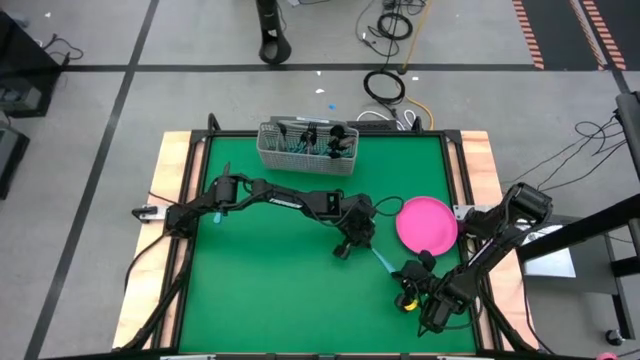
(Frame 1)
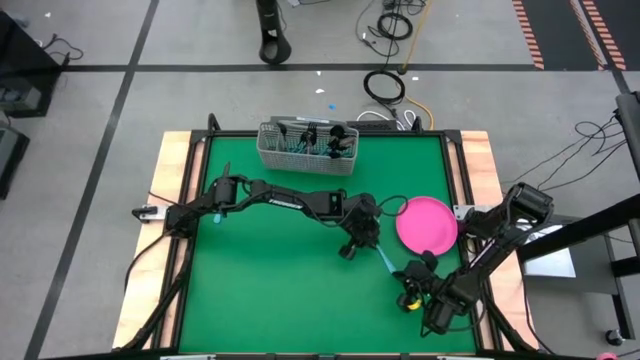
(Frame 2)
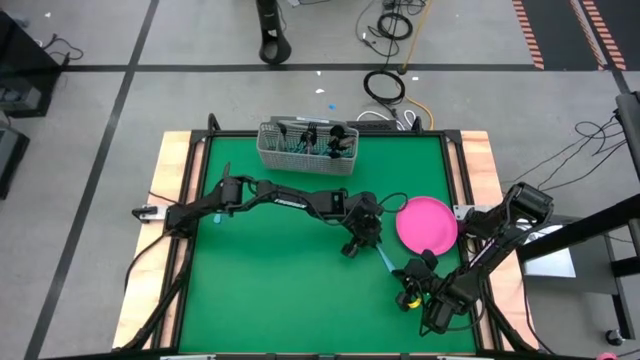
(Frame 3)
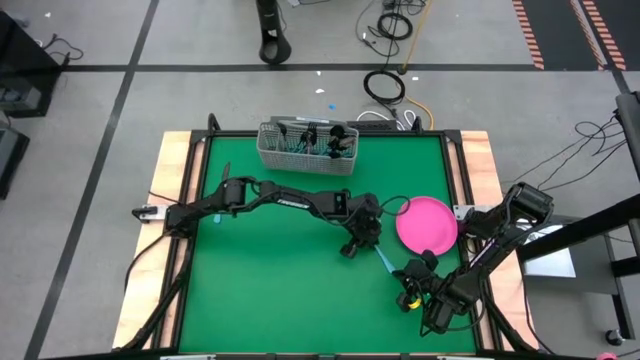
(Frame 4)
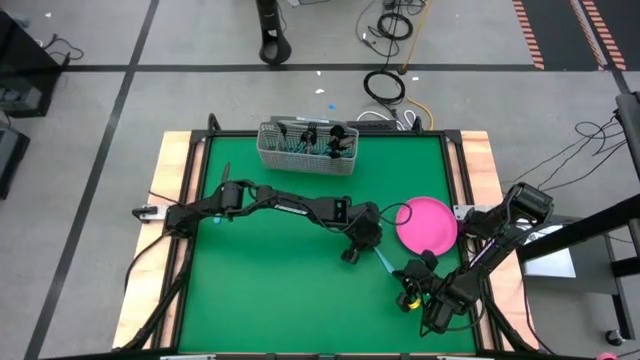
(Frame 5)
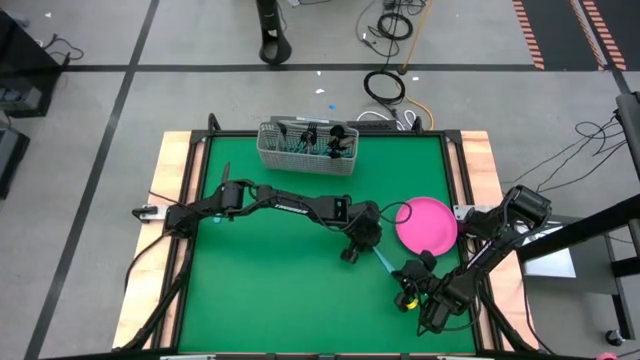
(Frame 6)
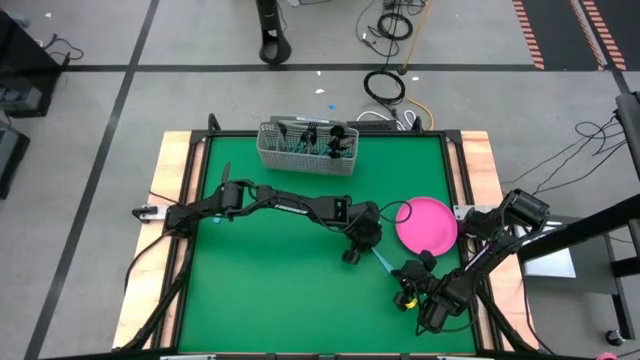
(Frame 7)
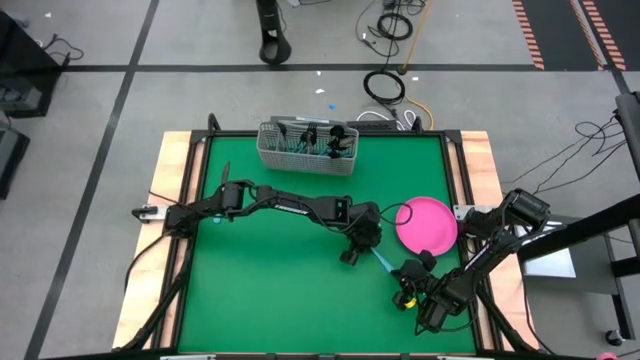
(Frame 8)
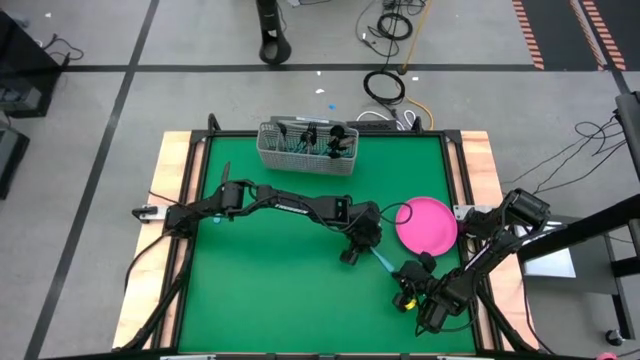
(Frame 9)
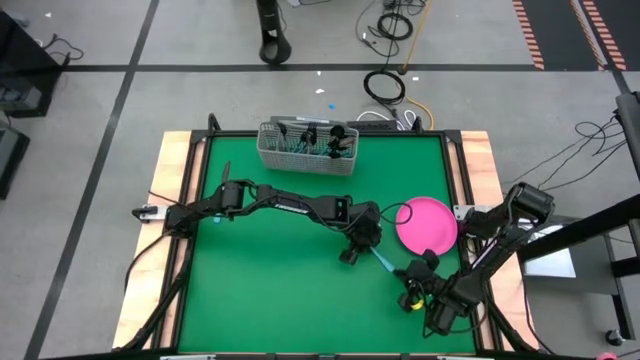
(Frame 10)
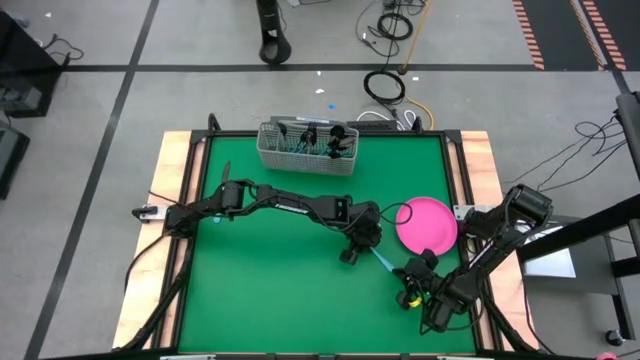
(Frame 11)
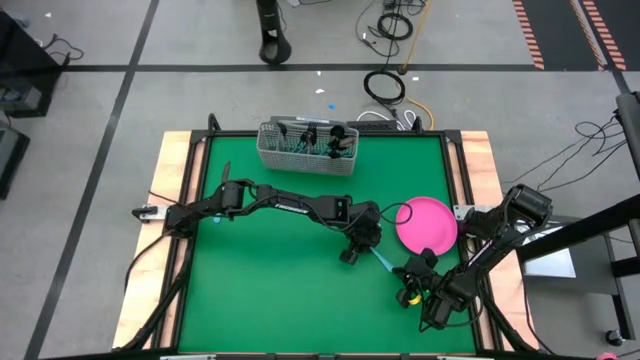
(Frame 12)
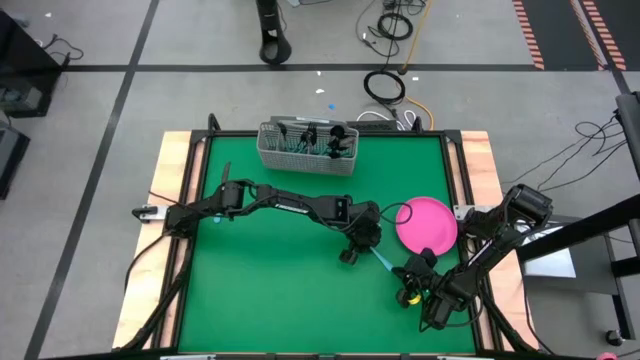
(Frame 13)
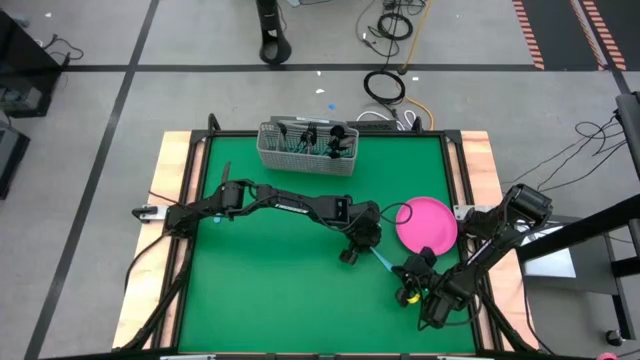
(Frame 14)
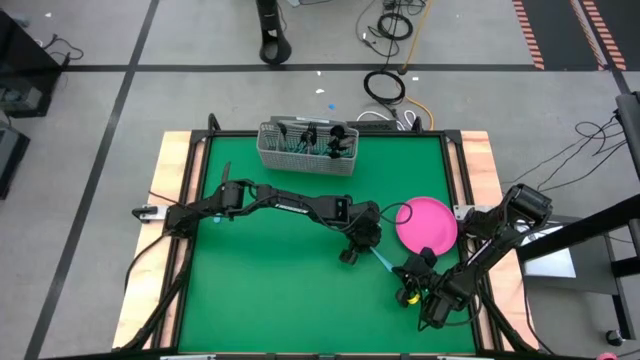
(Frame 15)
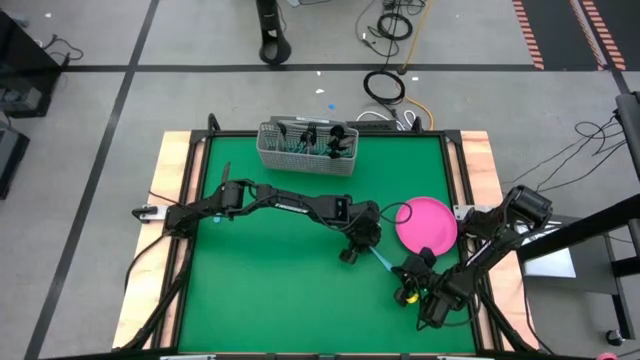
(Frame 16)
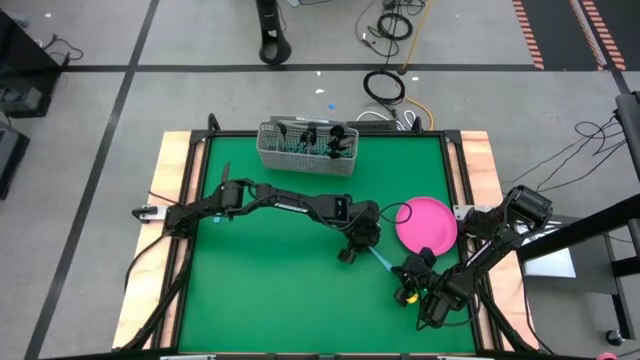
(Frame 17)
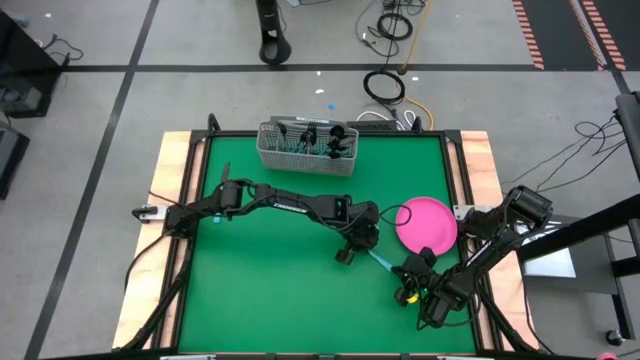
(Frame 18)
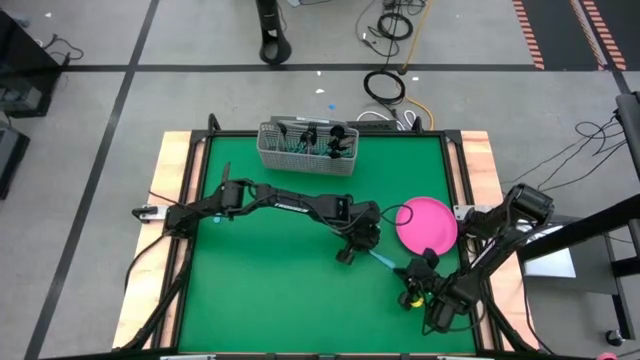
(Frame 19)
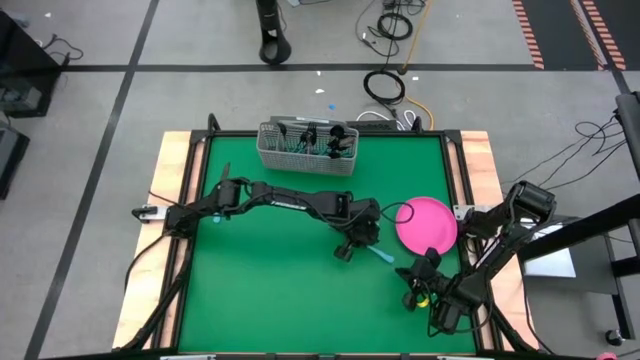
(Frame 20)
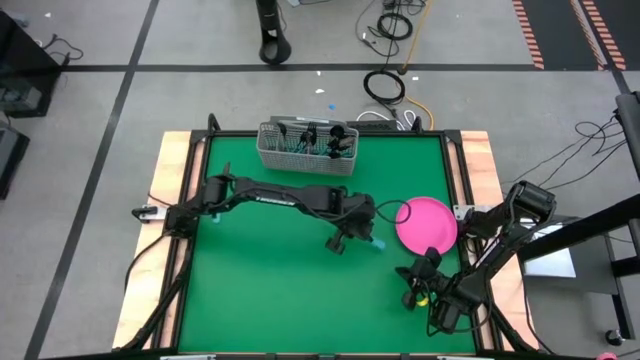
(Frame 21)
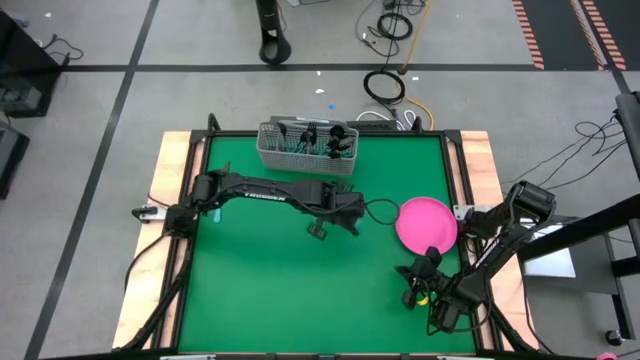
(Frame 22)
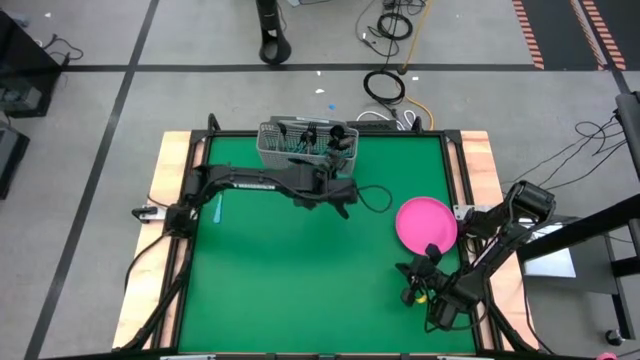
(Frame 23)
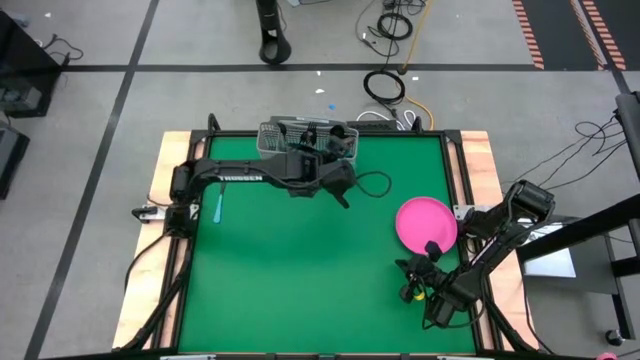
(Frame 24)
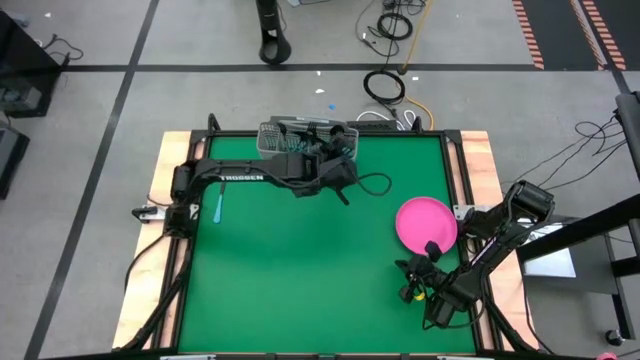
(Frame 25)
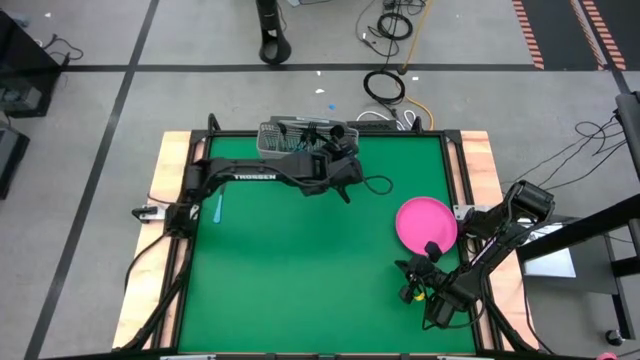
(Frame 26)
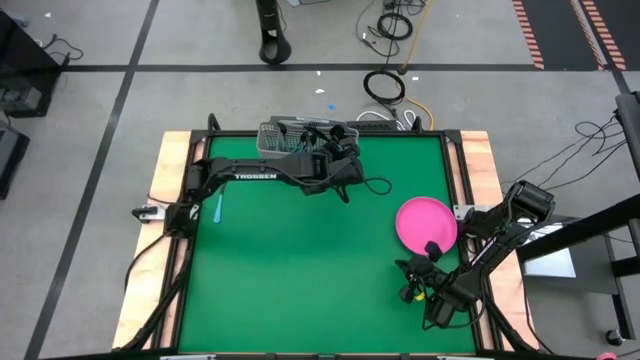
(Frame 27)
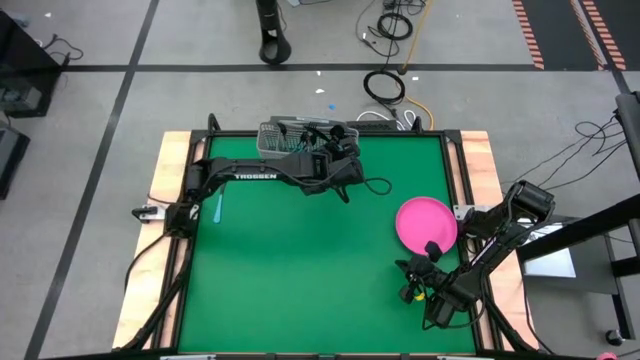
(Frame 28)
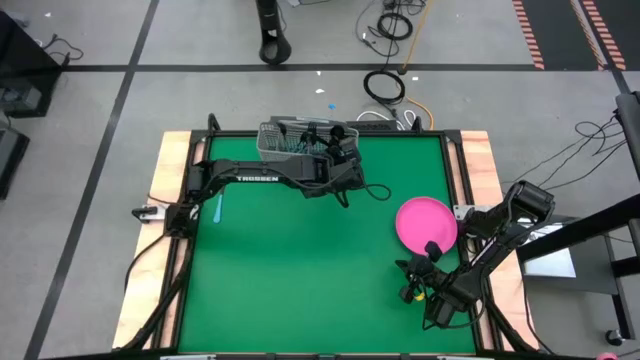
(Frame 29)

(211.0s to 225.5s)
Task: Sort silverware
Put the blue table knife into the silverware tray with the other blue table knives

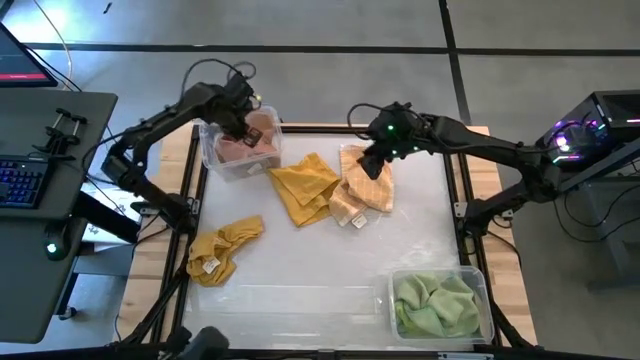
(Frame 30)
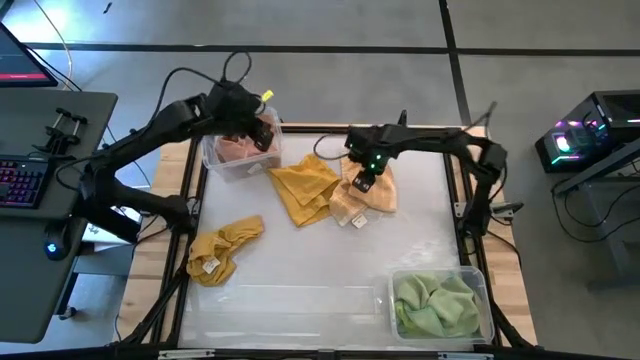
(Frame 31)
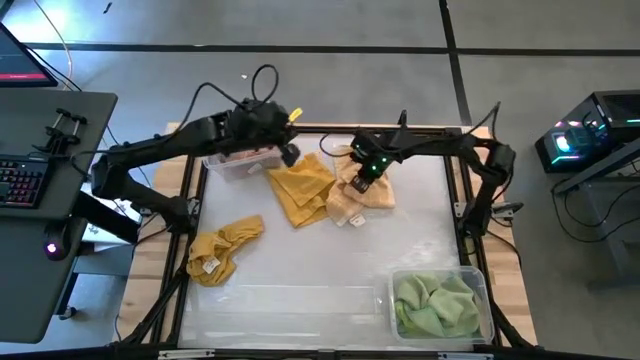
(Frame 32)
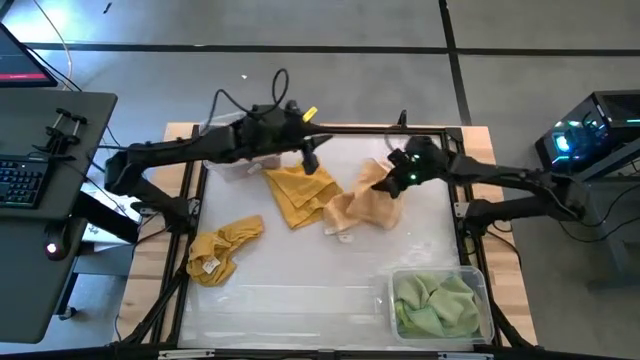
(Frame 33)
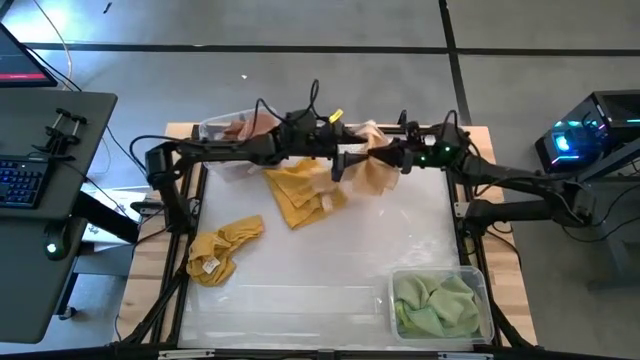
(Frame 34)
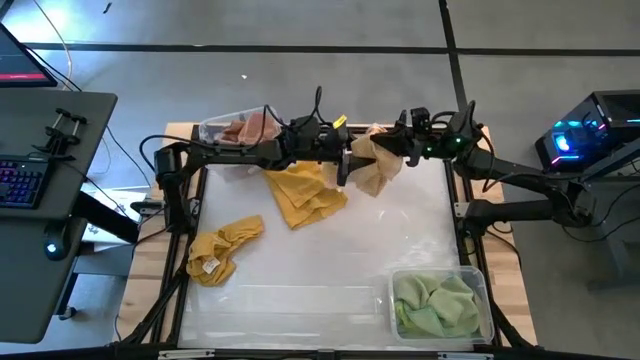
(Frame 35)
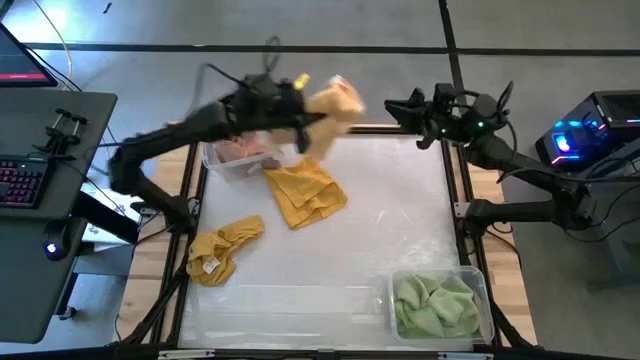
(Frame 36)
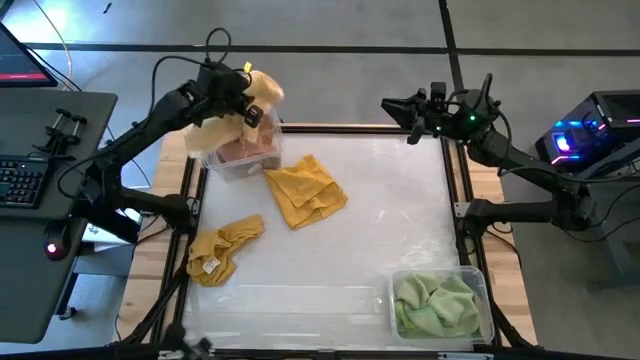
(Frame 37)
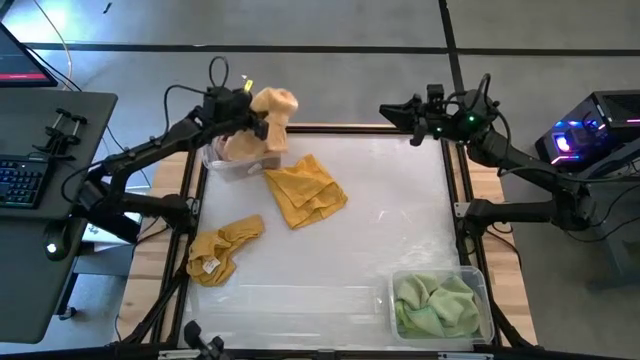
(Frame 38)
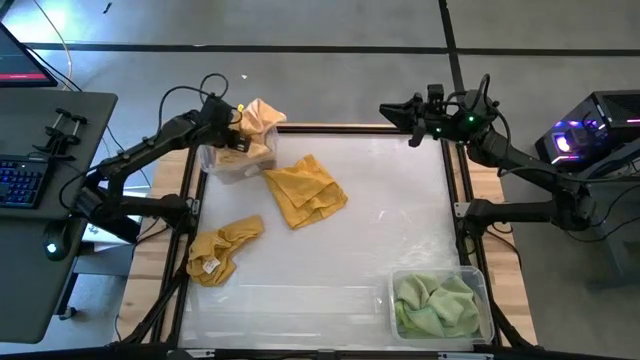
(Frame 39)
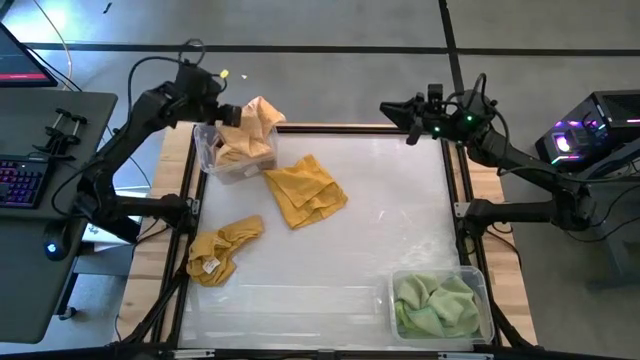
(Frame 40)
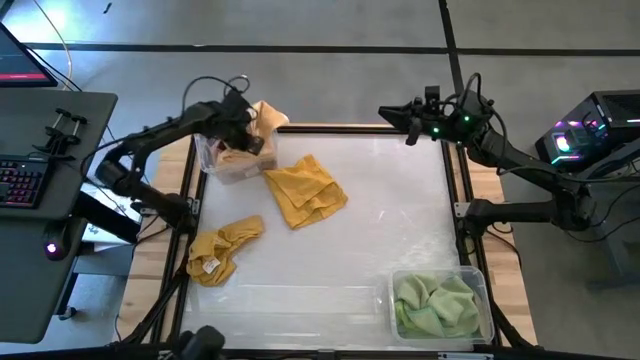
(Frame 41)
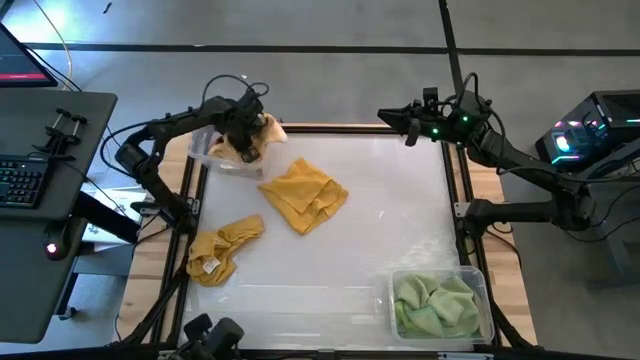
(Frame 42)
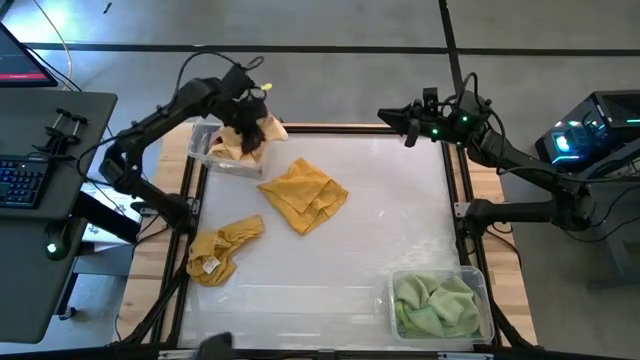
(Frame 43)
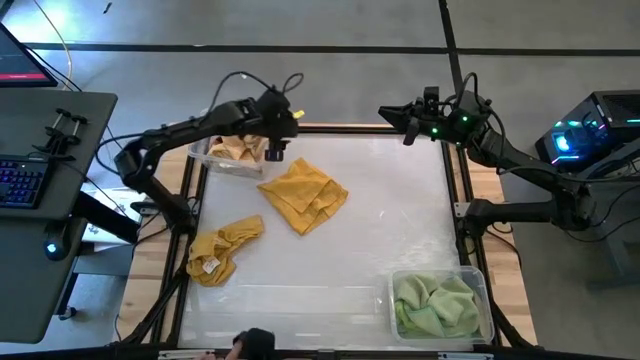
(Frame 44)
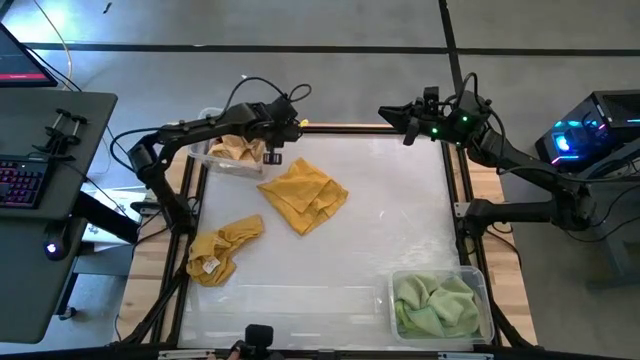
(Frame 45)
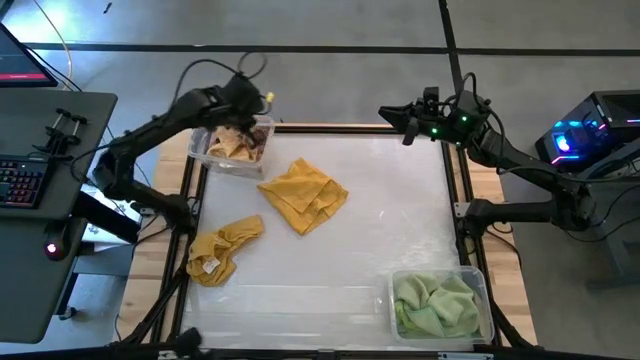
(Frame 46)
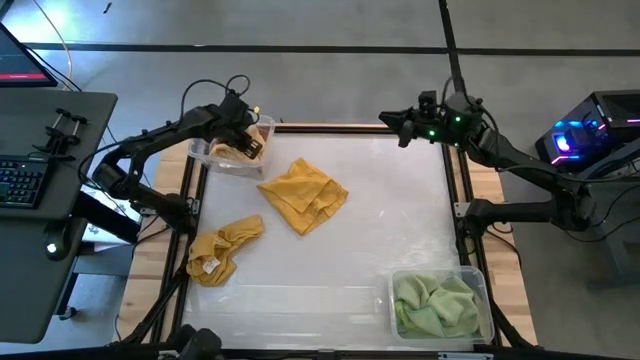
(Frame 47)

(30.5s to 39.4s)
Task: Sort towels by color in basket
Put the light yellow kitchen towel into the top transparent bin
